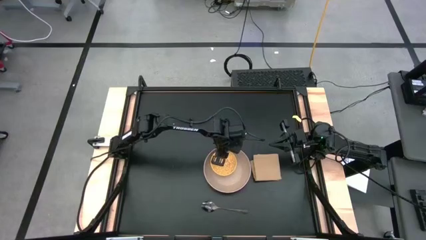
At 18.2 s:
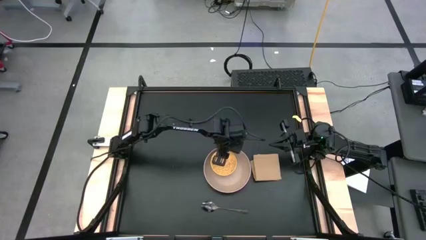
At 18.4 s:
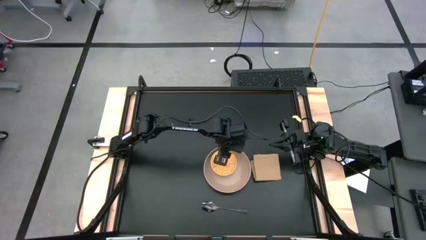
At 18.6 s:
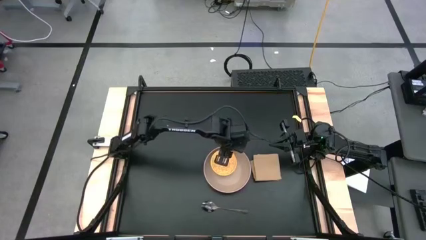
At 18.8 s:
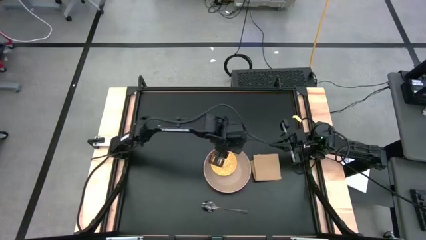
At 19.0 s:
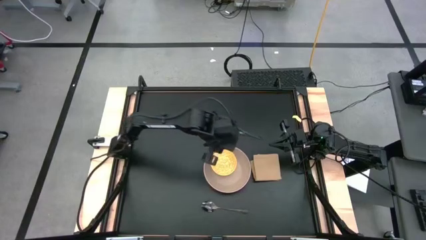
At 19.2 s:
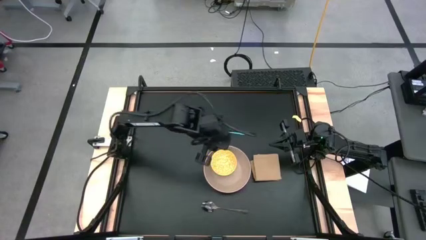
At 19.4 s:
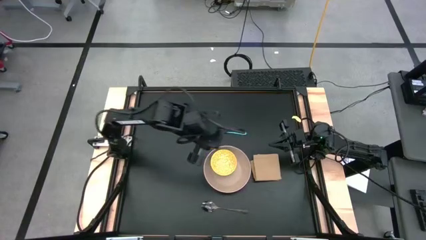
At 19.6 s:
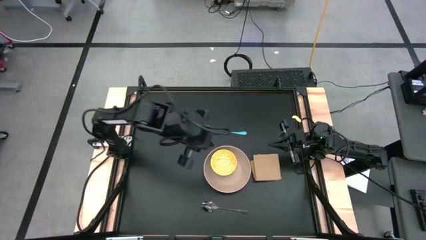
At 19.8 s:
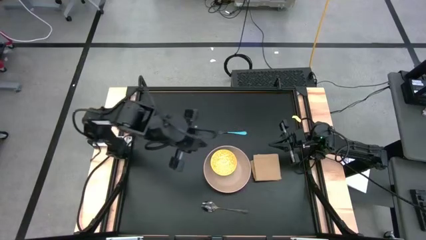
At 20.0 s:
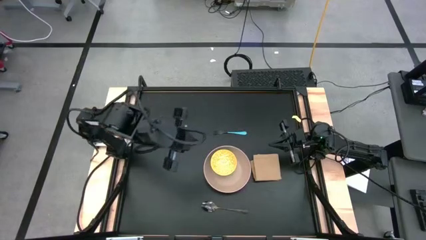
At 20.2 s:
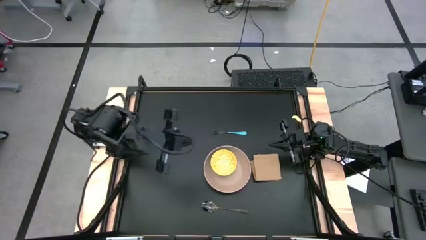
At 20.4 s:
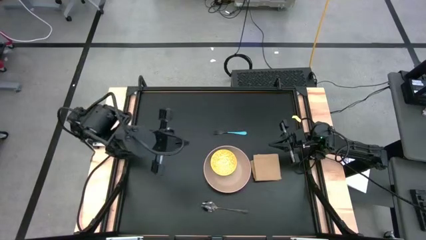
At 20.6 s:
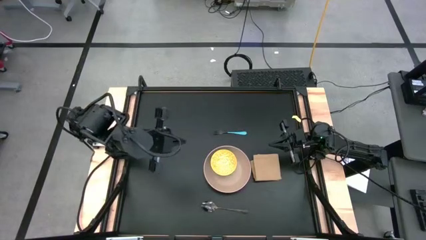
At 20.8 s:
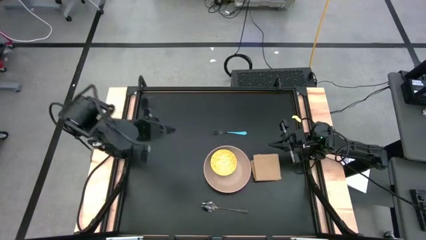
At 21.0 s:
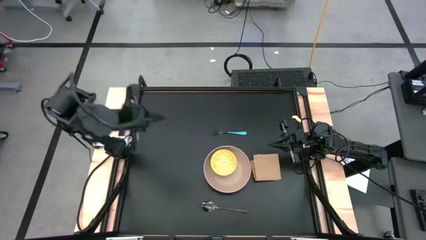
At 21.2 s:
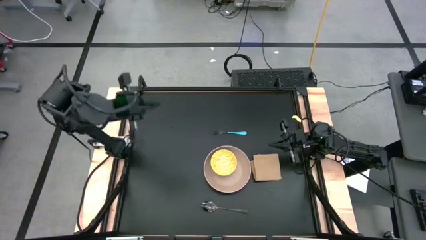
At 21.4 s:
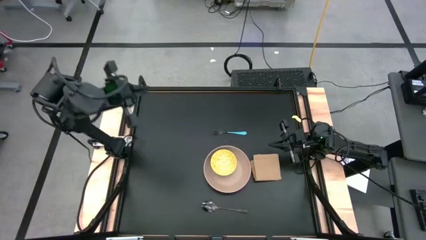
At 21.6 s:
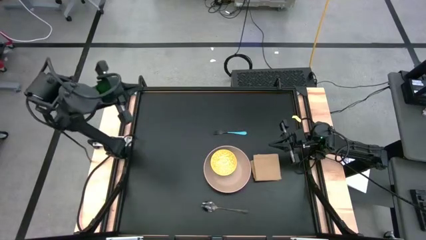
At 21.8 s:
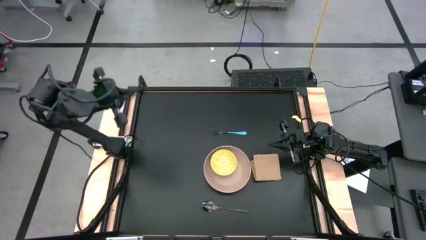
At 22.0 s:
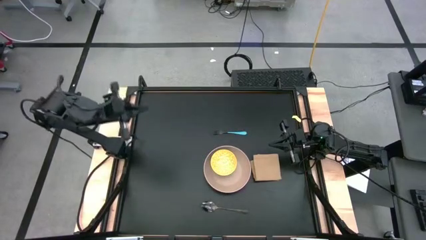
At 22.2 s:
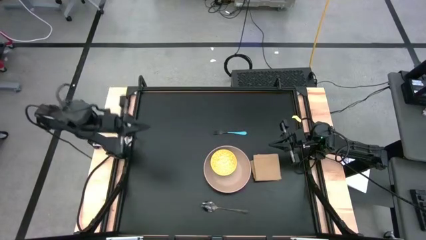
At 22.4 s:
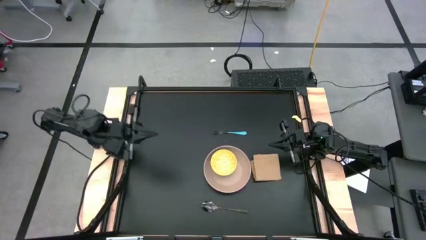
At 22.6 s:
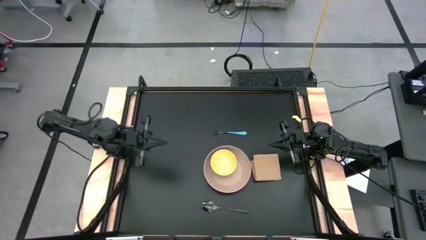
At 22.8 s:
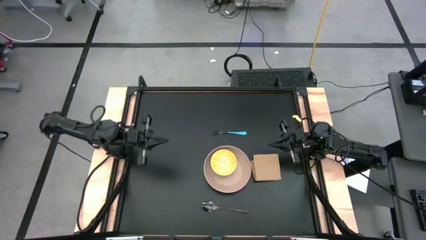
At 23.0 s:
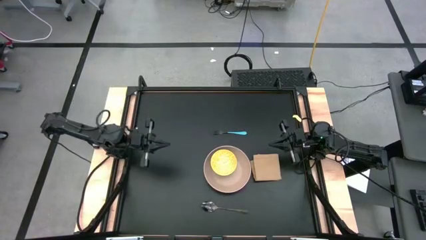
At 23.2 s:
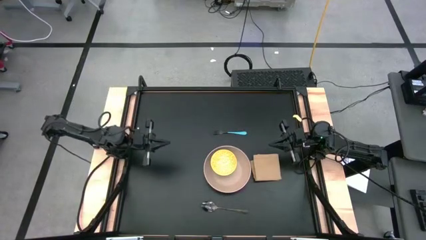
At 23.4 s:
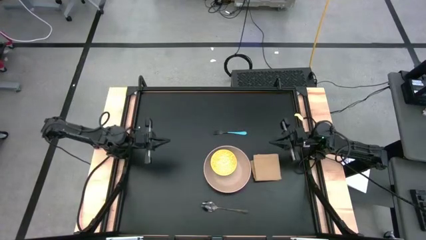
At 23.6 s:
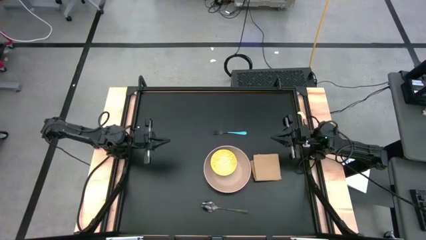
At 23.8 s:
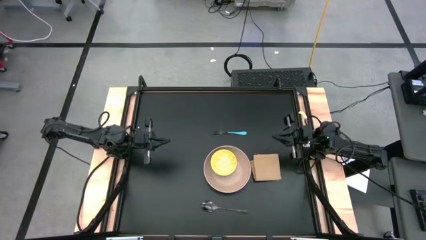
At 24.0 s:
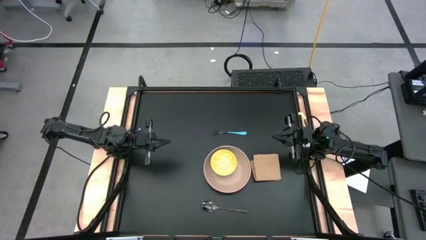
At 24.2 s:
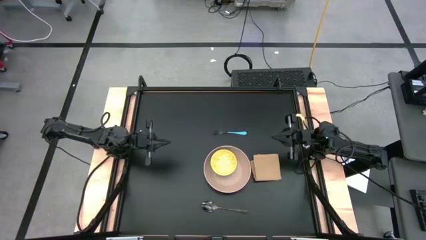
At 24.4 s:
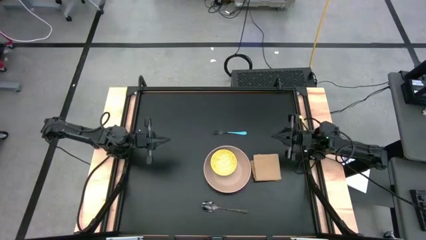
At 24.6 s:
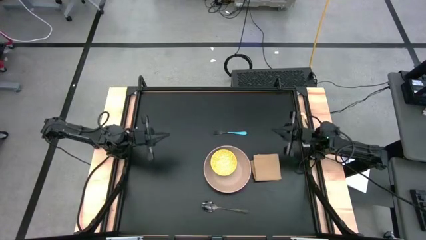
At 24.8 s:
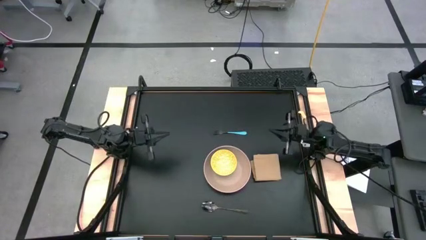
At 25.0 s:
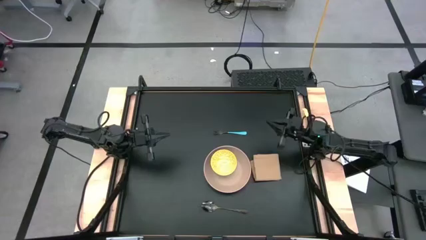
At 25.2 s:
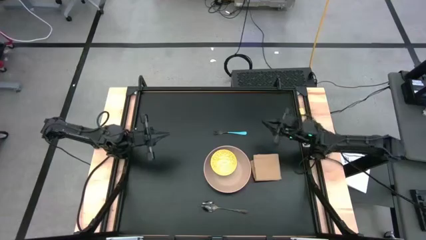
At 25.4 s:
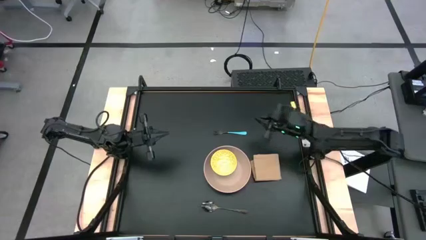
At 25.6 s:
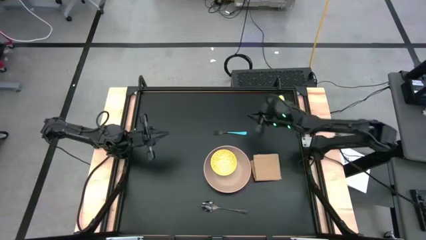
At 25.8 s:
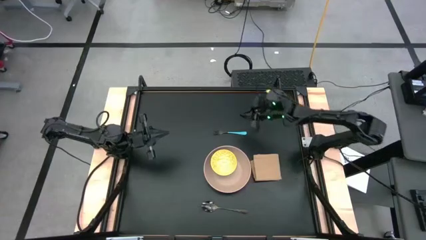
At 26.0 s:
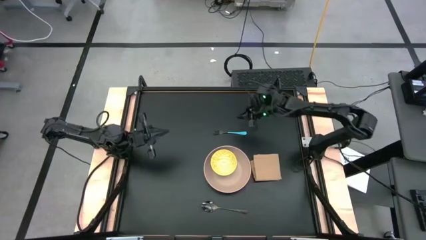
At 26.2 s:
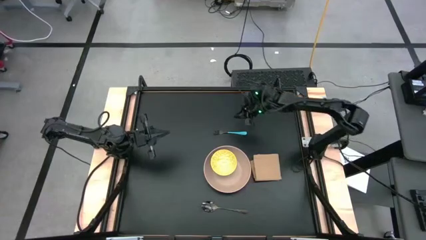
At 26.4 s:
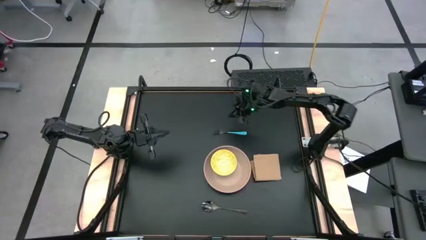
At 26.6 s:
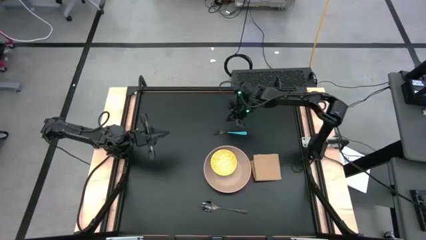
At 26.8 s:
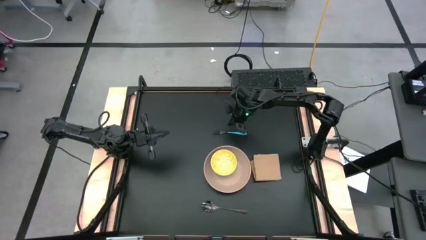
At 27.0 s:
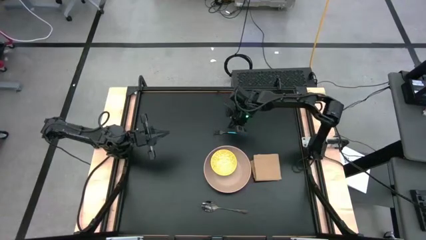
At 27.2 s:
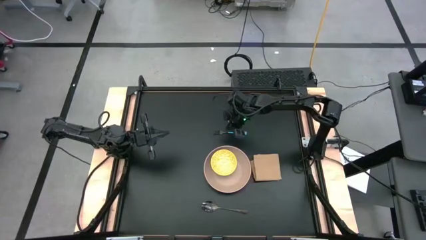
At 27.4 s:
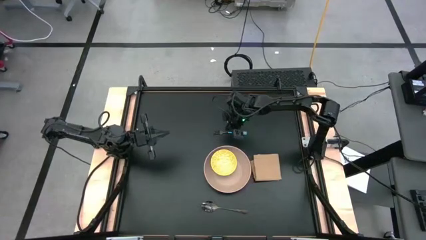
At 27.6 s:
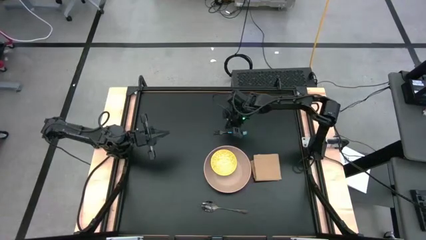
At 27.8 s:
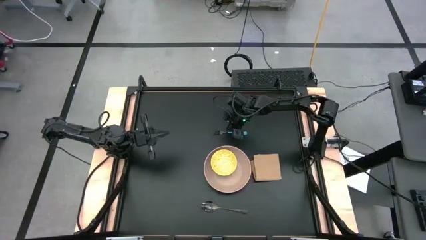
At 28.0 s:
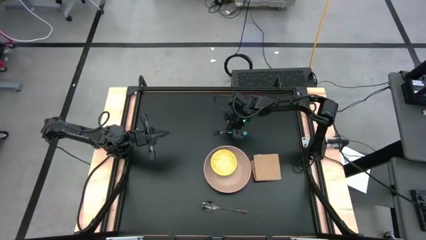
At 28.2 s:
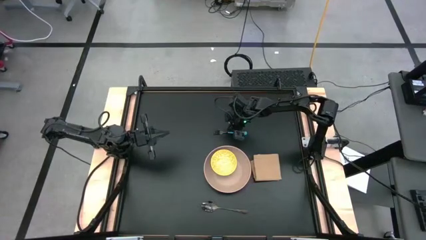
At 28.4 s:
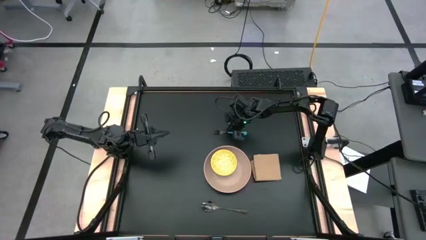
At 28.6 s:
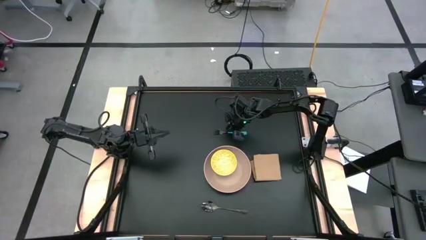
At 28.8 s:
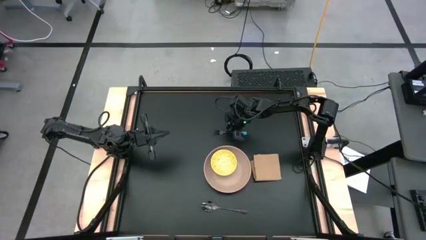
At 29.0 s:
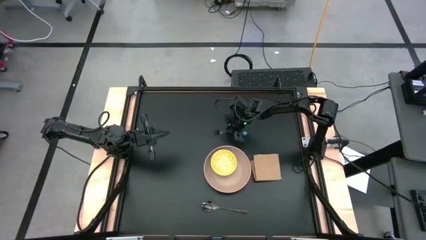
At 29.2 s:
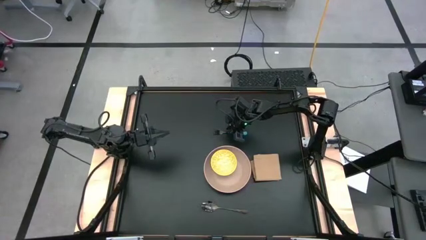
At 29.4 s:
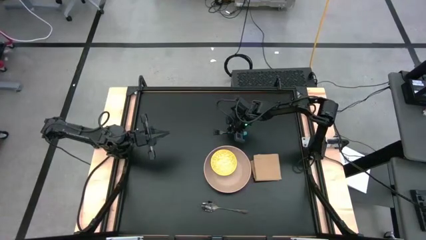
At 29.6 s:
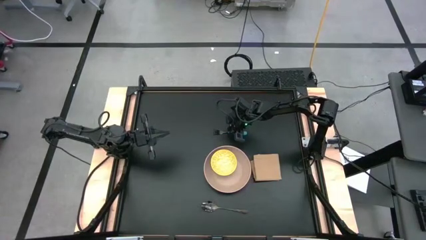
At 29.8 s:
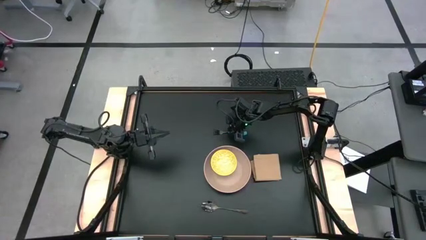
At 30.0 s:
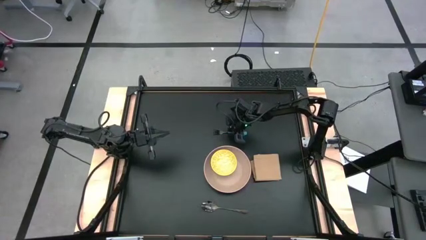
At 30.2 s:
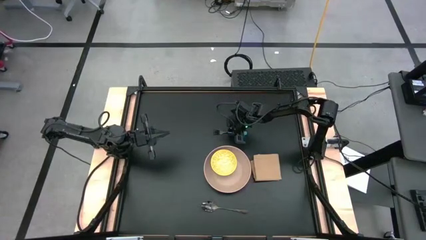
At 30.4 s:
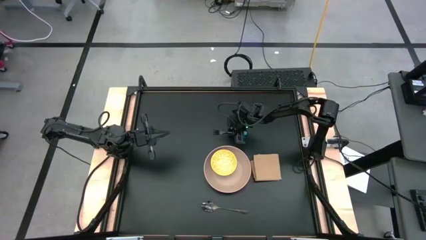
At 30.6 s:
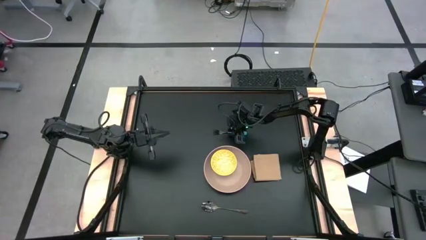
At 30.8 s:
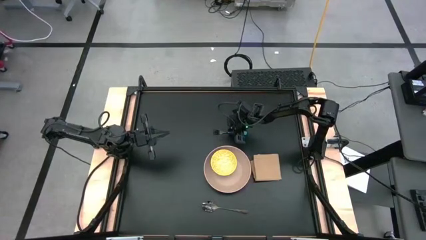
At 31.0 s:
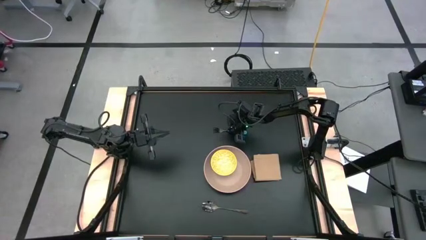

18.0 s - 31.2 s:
Task: Set table place
Adjust the blue fork
